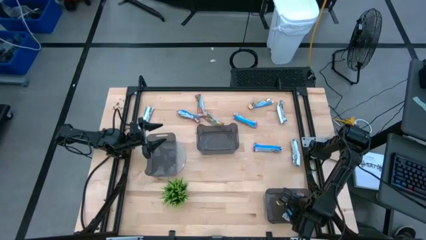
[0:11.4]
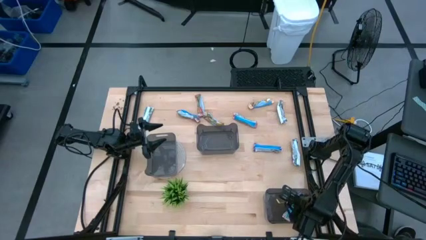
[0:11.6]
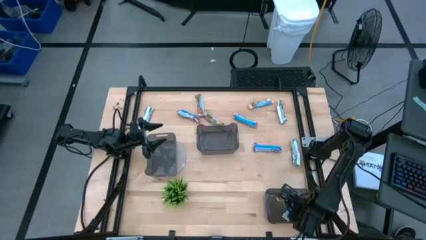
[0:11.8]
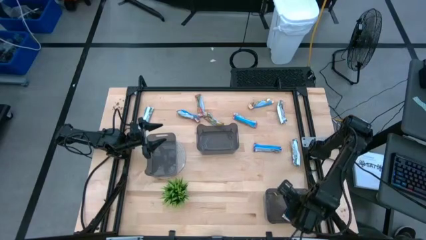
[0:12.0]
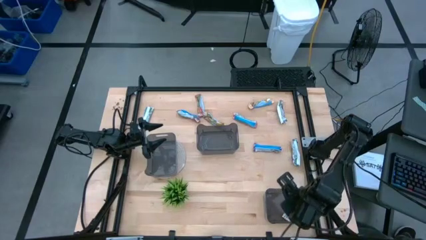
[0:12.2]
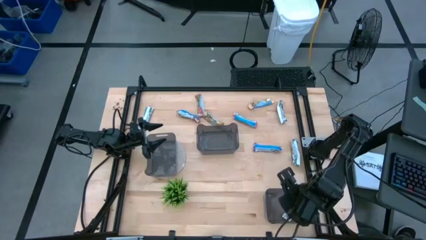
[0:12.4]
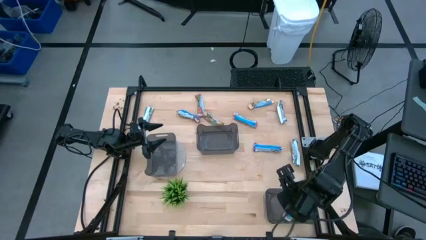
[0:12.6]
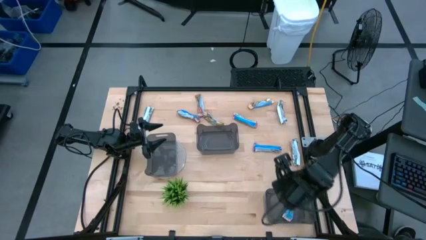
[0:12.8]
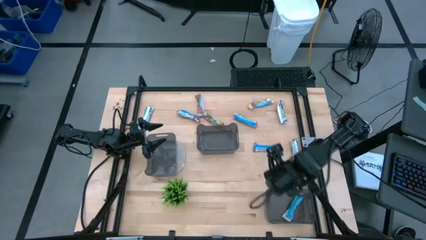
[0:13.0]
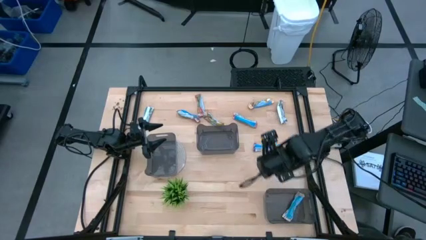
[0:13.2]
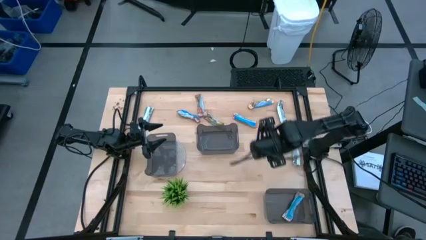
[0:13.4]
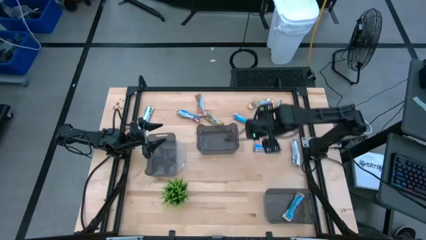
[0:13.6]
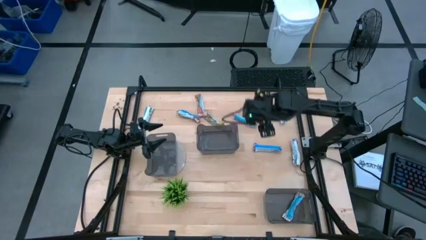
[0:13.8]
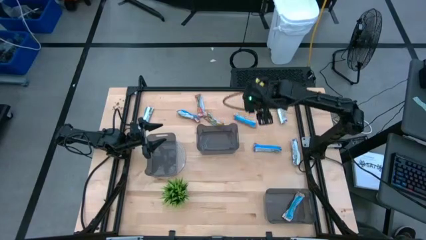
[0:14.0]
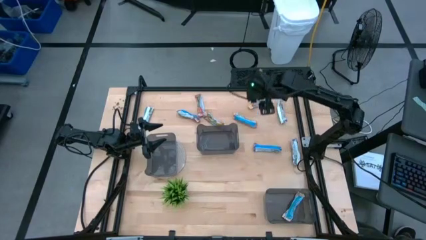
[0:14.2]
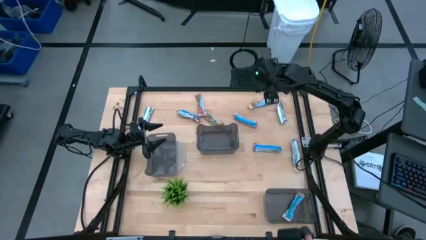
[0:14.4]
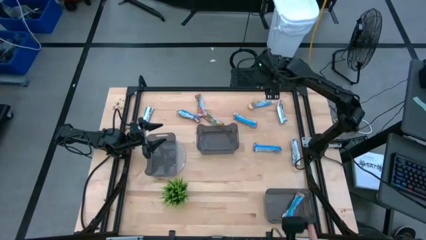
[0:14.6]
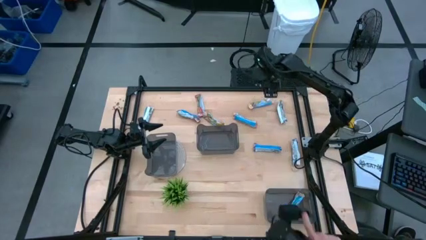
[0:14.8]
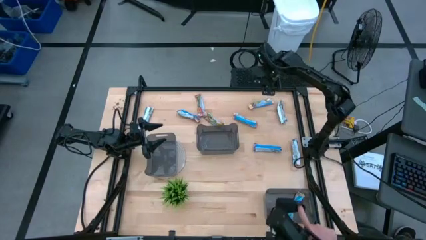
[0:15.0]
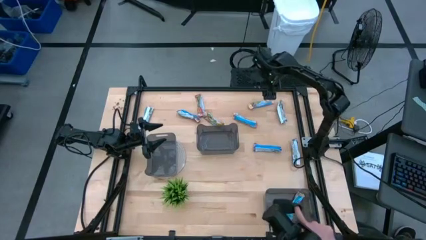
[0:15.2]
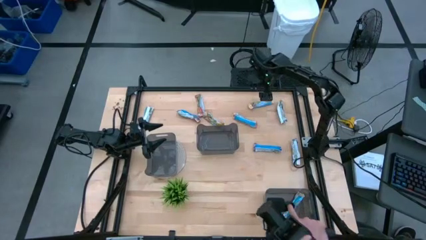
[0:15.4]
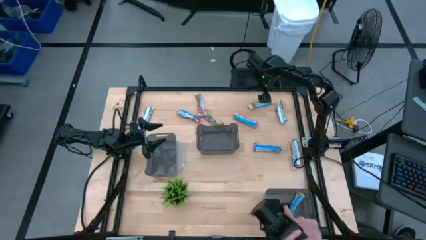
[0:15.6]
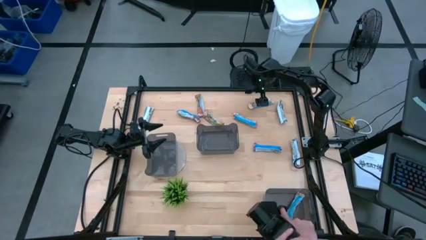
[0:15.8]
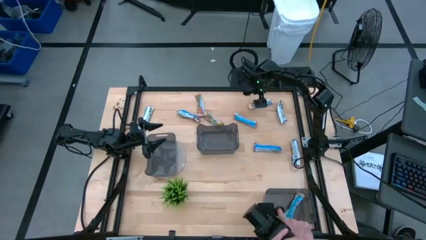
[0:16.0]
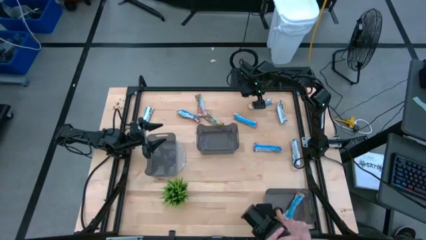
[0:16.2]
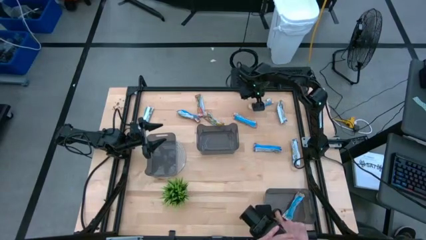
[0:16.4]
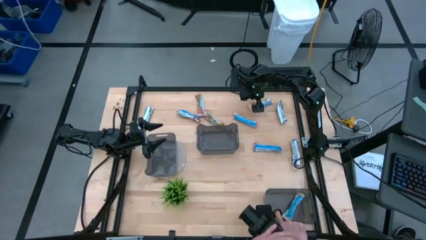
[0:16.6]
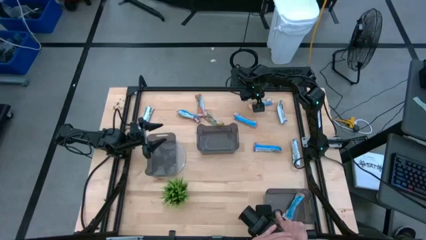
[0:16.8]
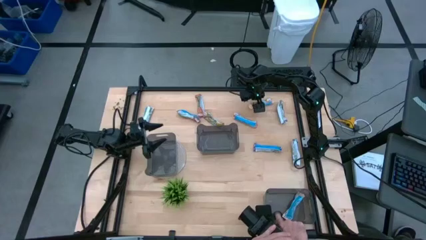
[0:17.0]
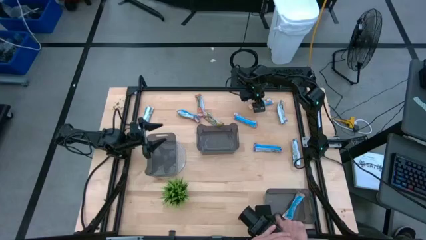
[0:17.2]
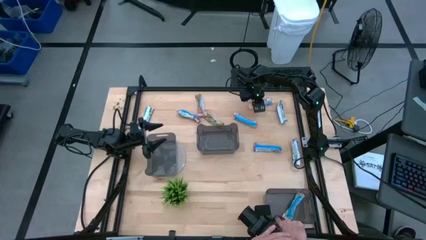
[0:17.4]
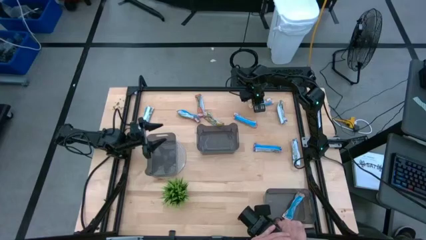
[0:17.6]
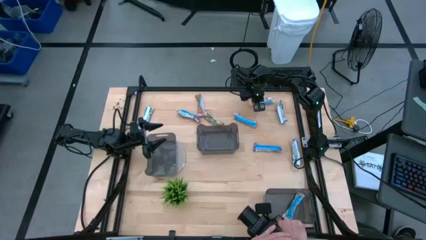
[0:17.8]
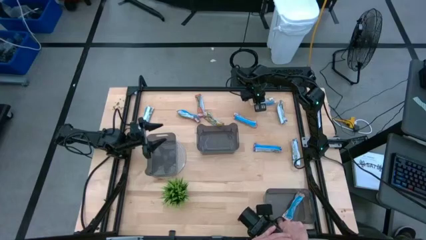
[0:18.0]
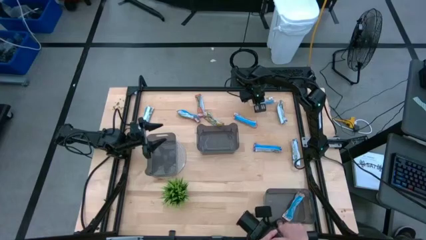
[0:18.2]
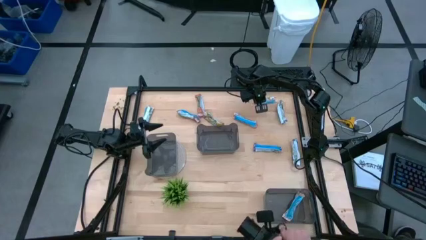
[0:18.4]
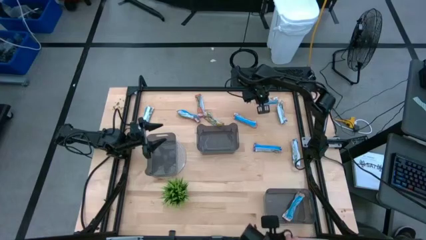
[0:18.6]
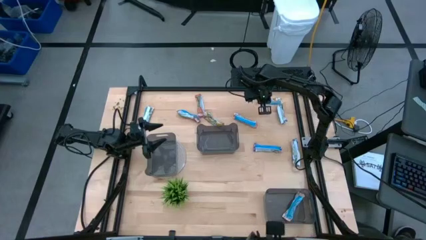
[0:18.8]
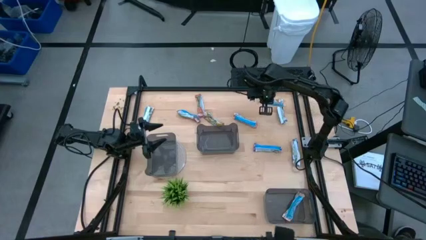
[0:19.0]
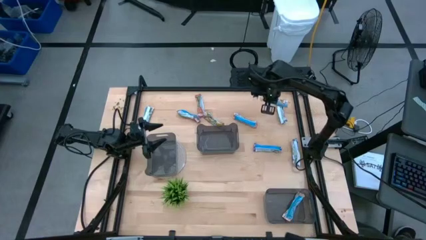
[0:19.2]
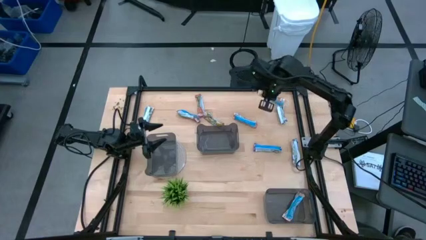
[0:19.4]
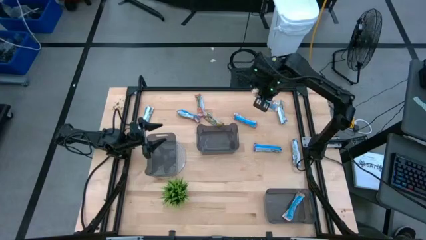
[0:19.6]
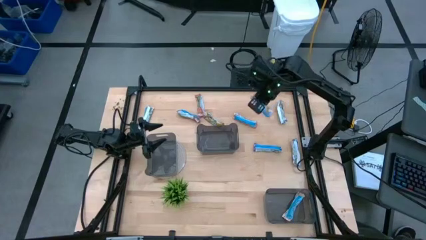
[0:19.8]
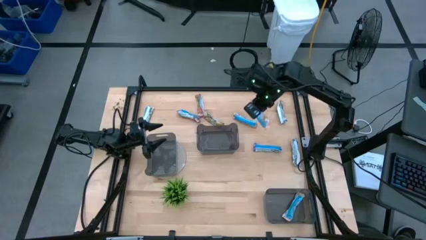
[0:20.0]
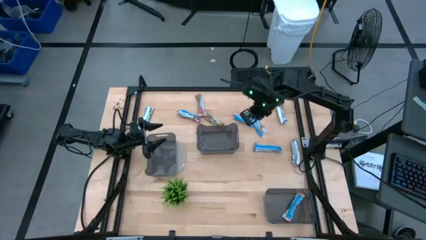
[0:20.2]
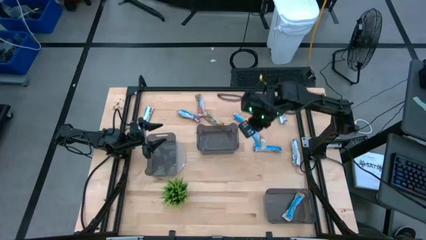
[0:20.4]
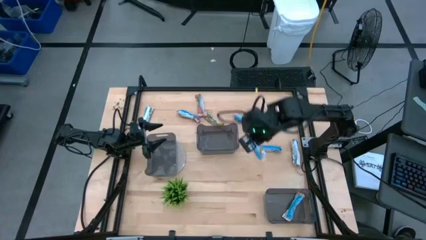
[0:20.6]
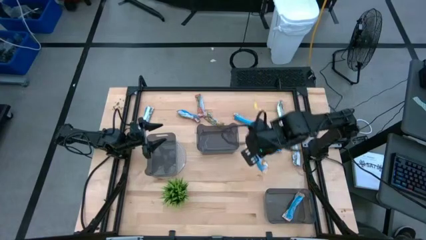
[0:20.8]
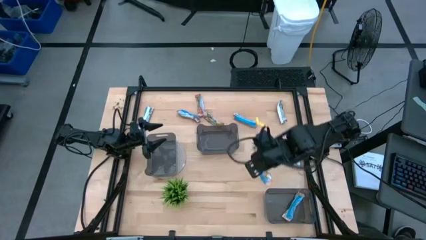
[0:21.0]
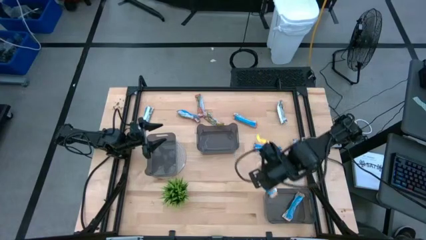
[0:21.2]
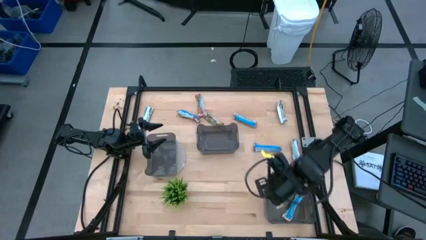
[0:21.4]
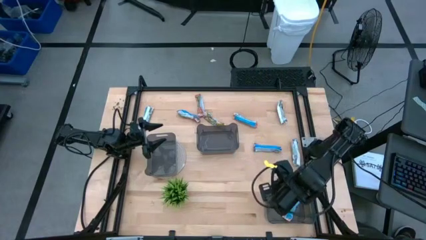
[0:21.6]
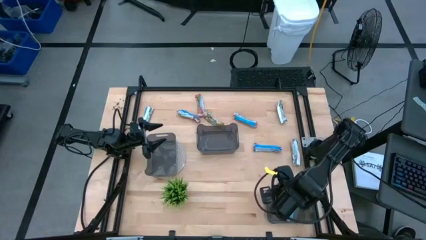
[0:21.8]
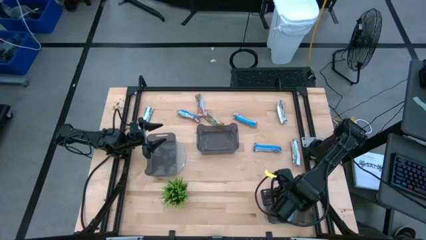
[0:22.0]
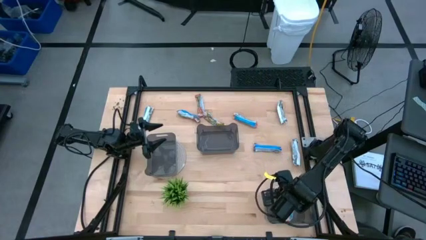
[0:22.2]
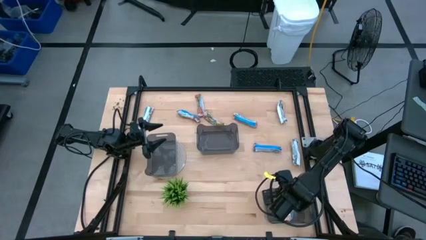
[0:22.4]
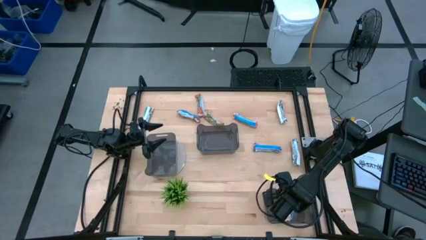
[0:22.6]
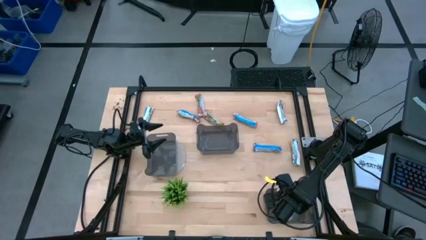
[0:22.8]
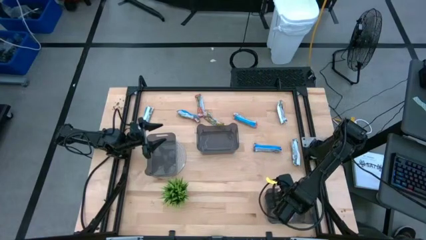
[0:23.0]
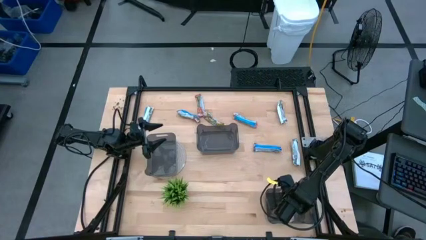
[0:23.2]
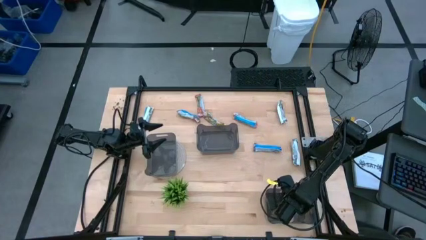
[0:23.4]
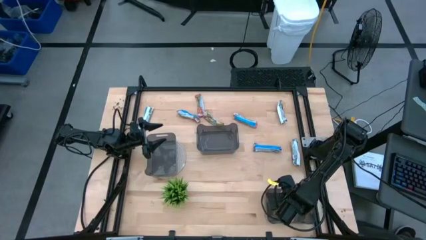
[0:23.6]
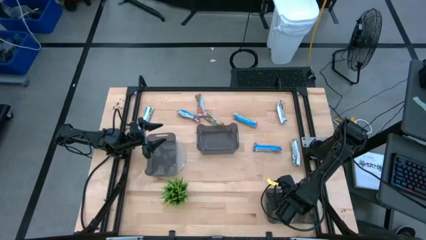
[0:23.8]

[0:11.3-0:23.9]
Task: Pick and place Granola Bars by type
Put the orange granola bar into the bottom black bin
